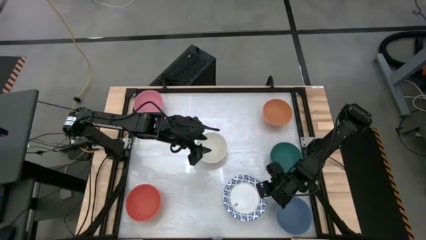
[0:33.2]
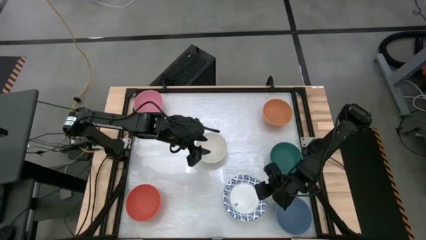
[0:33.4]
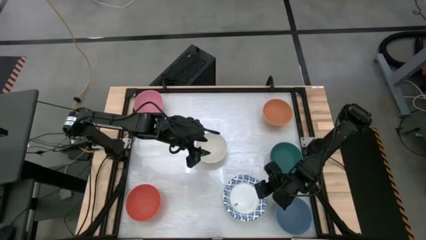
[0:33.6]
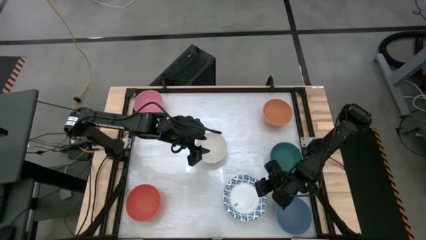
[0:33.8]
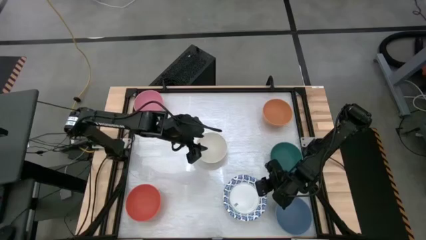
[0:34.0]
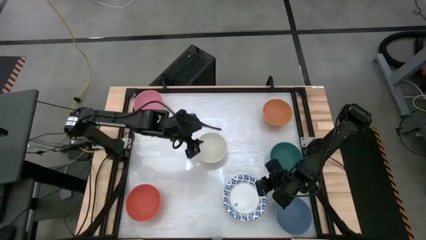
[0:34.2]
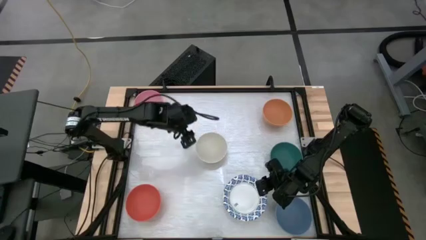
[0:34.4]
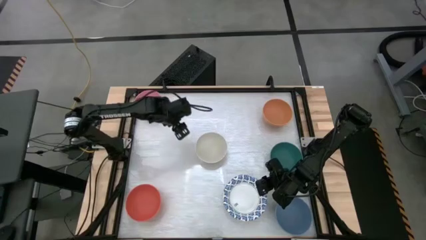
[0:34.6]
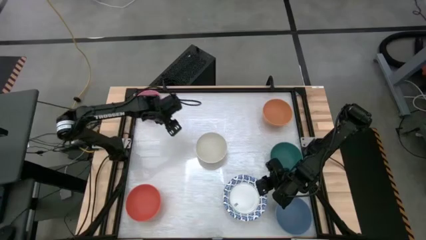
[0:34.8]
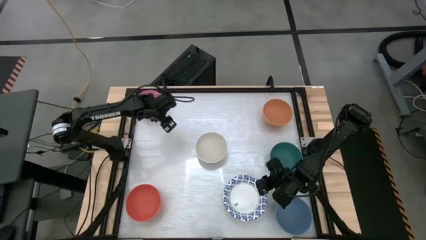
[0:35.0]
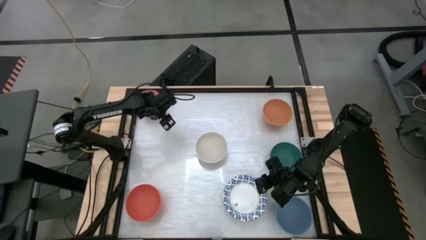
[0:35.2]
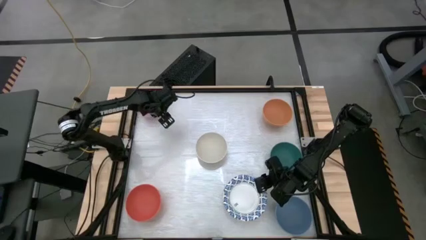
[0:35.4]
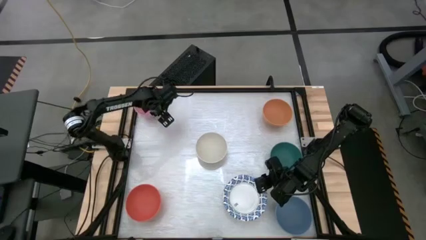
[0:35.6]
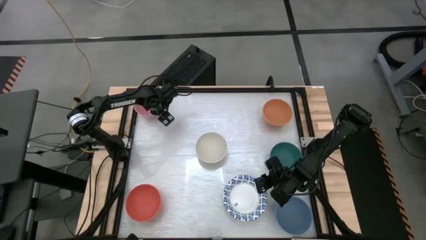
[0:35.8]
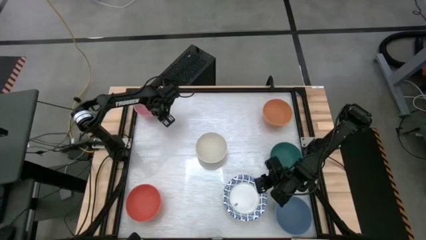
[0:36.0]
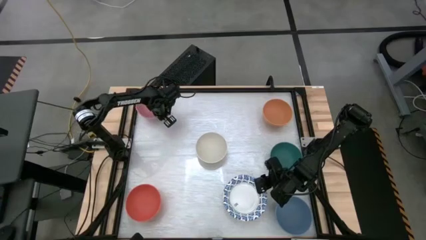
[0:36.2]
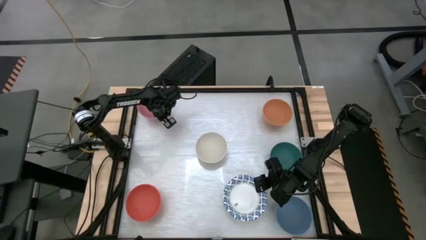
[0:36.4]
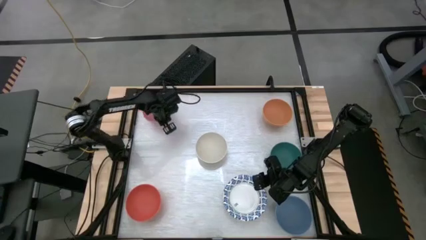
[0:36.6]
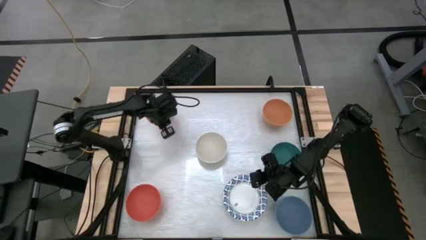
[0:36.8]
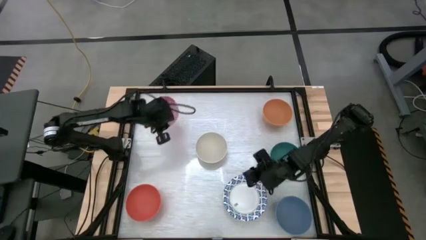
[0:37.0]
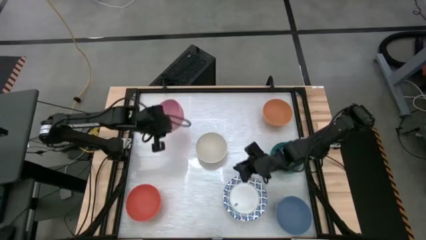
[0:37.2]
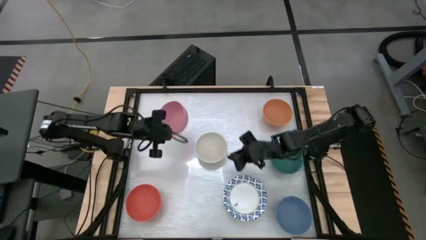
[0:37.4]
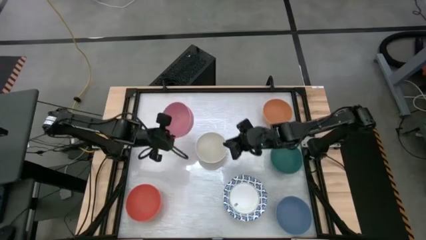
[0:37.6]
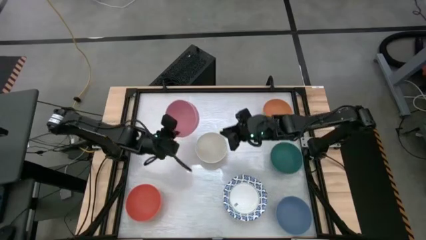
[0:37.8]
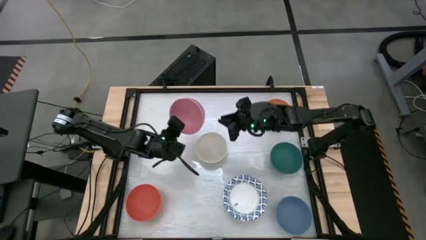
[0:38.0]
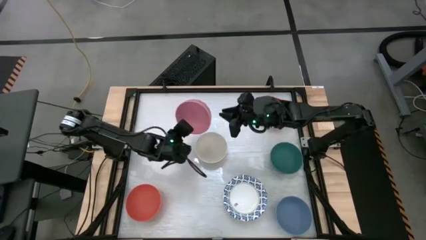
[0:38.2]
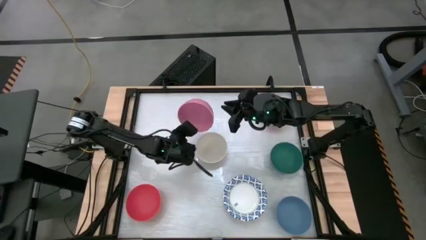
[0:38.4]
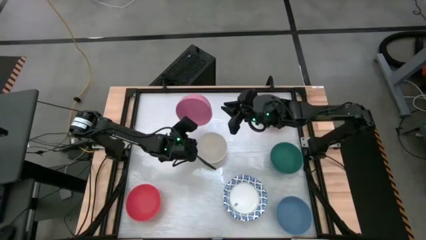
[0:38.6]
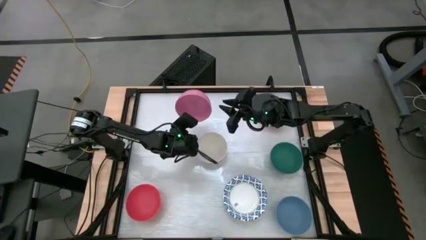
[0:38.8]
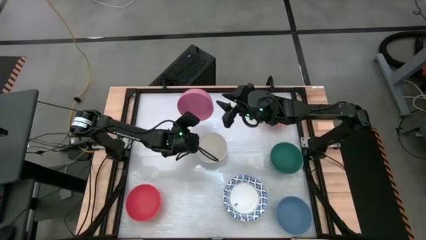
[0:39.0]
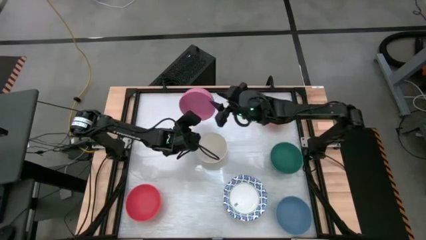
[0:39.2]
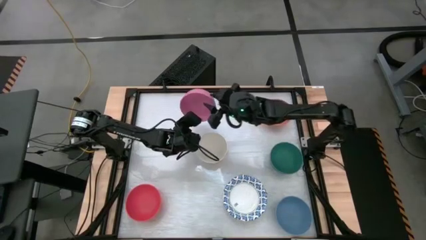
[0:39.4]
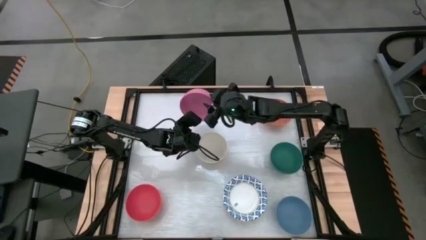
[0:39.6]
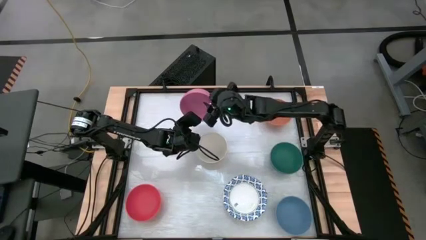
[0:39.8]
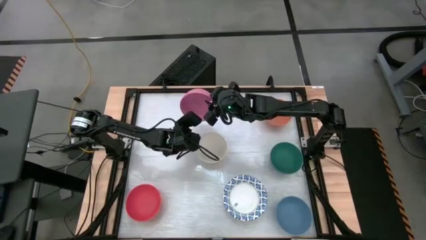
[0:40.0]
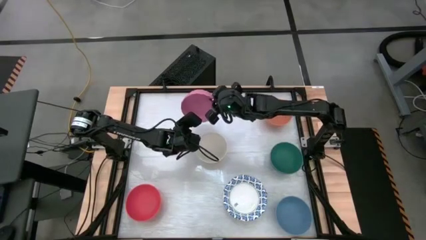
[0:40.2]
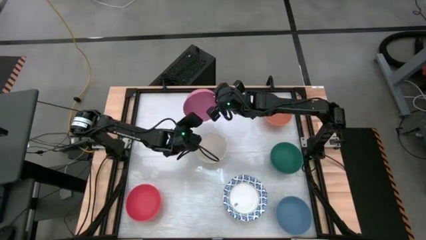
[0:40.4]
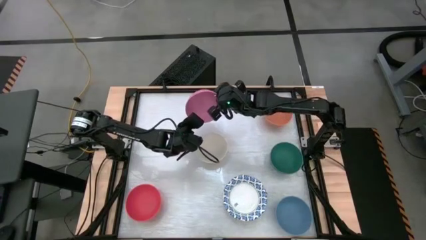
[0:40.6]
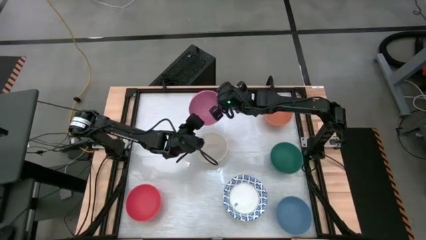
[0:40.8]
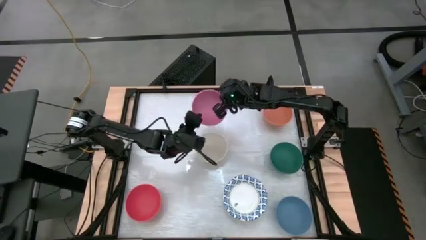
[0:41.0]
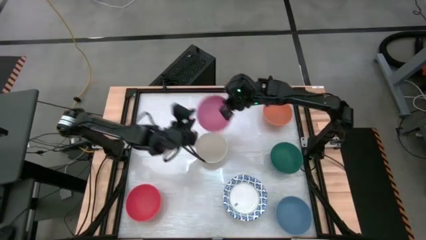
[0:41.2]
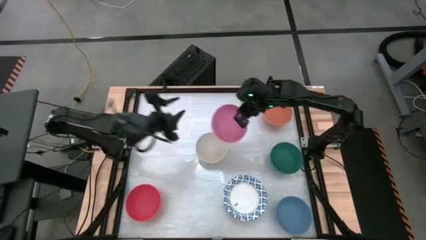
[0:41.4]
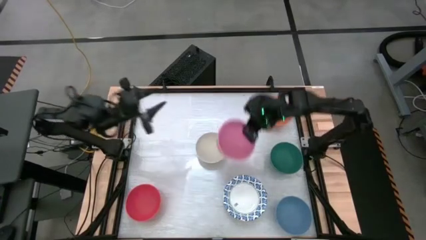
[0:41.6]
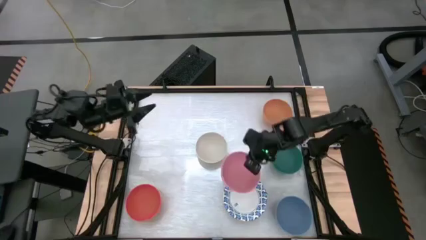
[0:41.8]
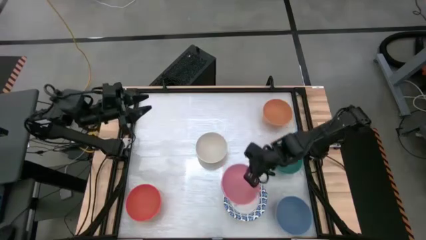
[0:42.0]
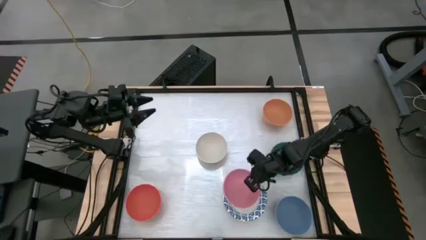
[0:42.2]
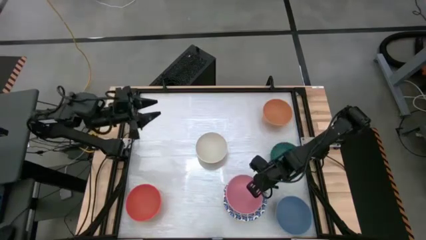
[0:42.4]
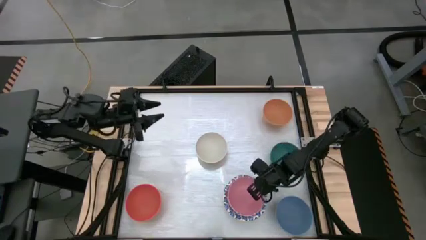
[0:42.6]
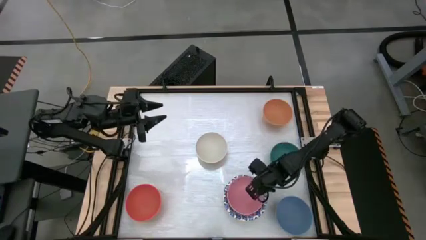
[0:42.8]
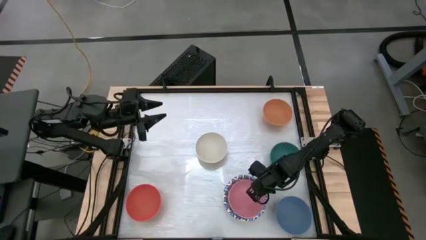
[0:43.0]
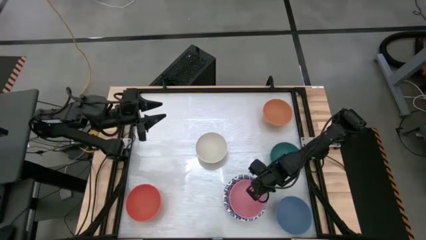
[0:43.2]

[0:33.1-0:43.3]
Stack the pink bowl on top of the white patterned bowl

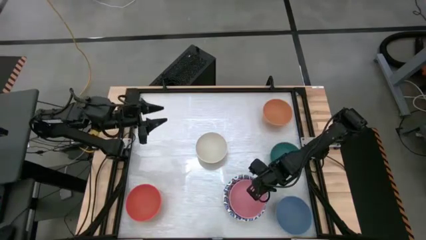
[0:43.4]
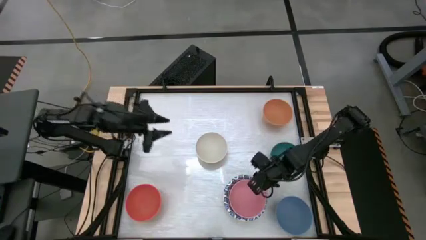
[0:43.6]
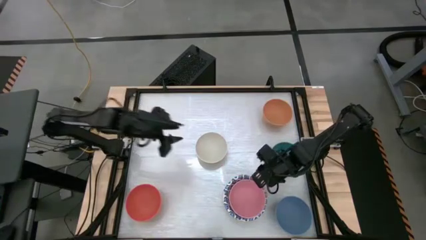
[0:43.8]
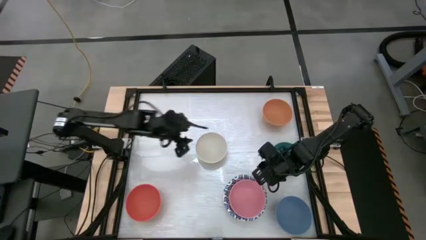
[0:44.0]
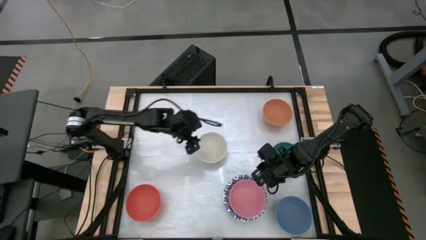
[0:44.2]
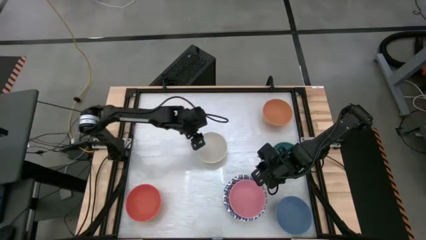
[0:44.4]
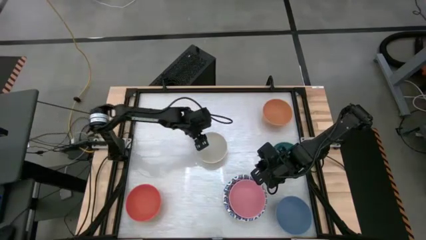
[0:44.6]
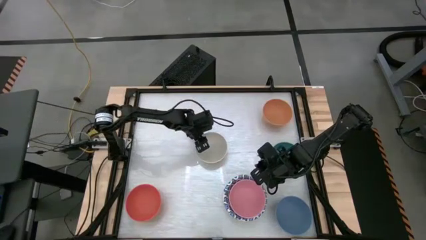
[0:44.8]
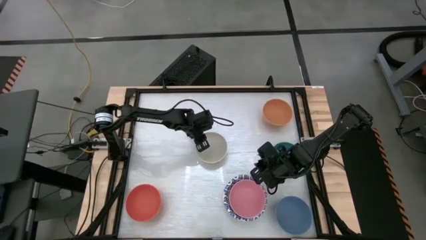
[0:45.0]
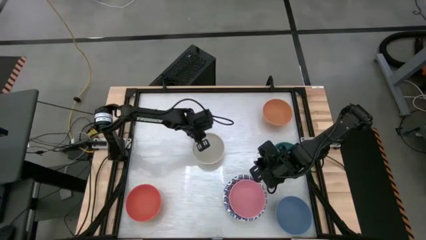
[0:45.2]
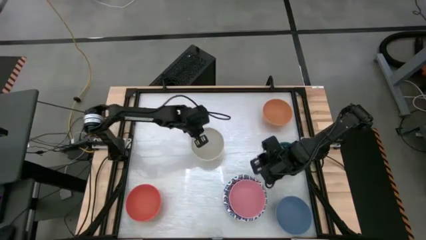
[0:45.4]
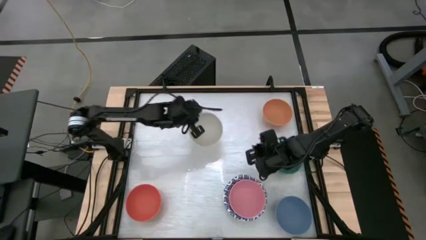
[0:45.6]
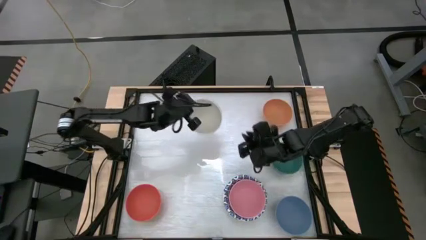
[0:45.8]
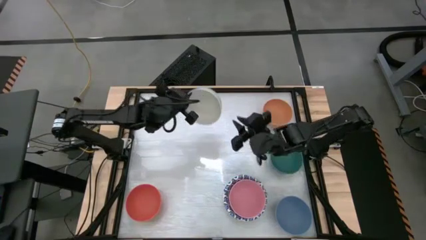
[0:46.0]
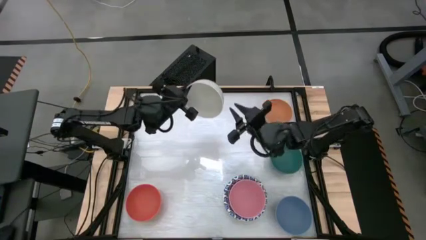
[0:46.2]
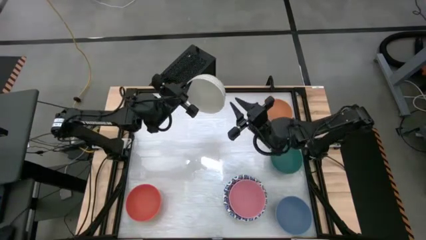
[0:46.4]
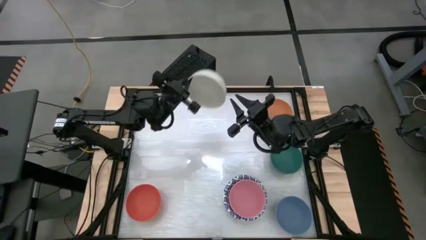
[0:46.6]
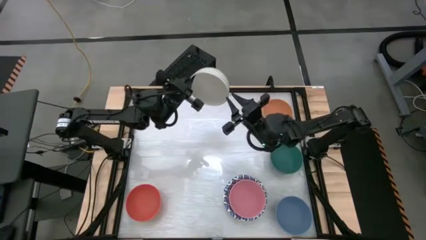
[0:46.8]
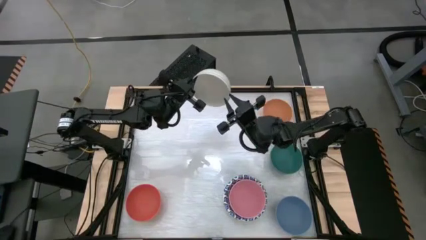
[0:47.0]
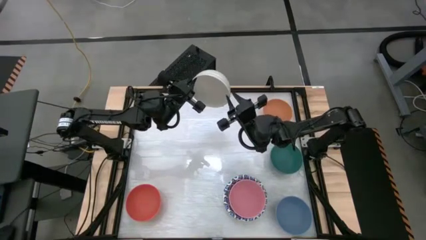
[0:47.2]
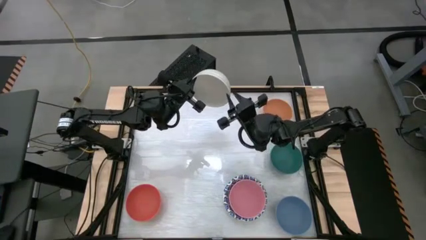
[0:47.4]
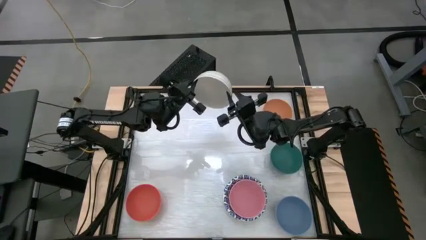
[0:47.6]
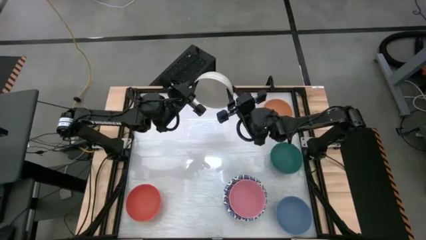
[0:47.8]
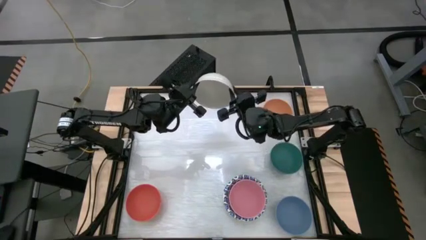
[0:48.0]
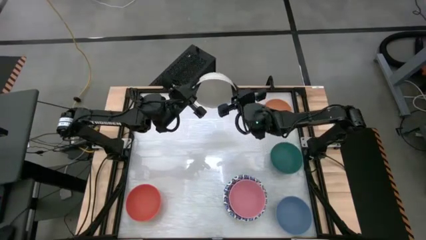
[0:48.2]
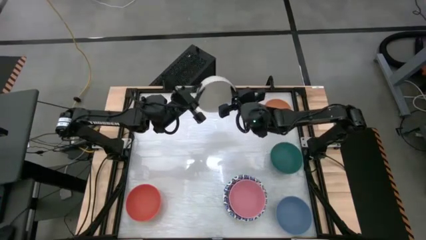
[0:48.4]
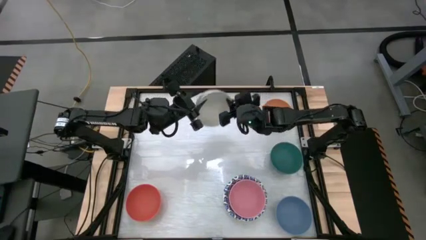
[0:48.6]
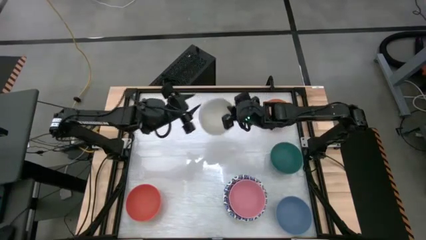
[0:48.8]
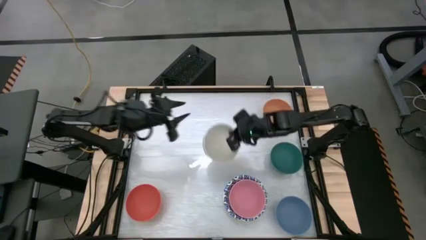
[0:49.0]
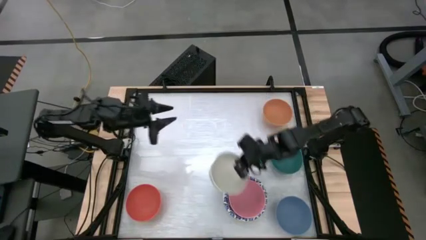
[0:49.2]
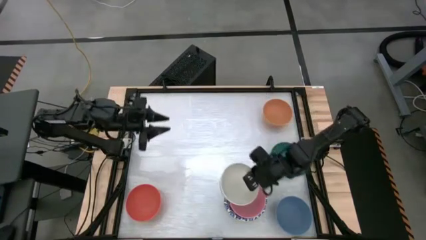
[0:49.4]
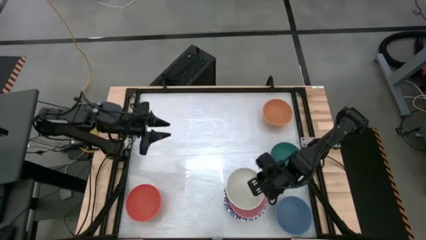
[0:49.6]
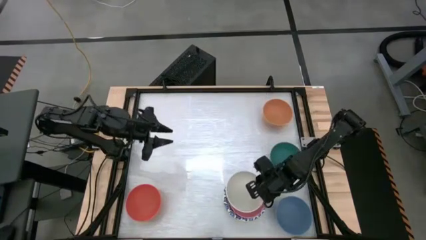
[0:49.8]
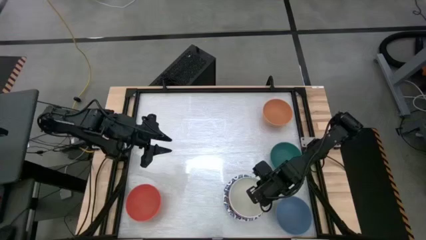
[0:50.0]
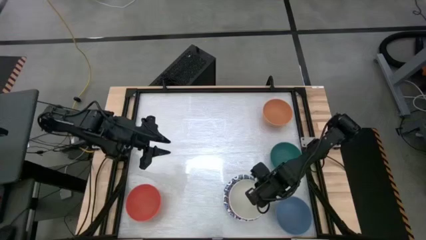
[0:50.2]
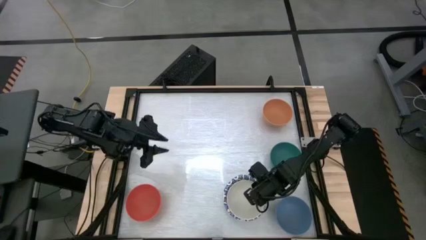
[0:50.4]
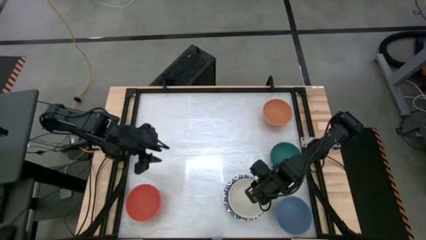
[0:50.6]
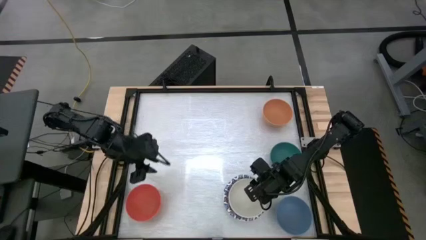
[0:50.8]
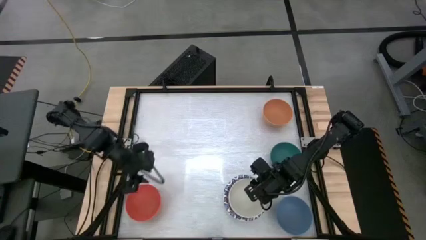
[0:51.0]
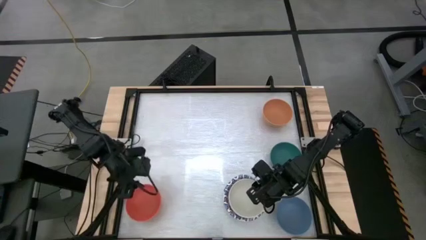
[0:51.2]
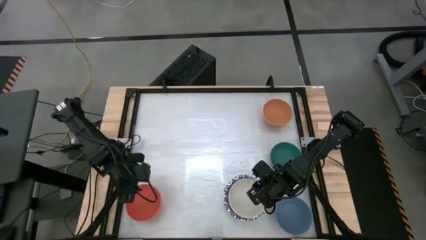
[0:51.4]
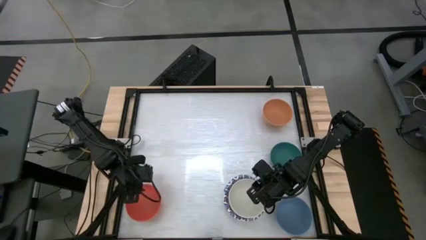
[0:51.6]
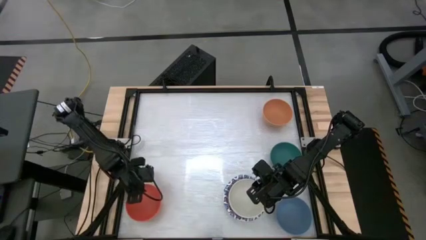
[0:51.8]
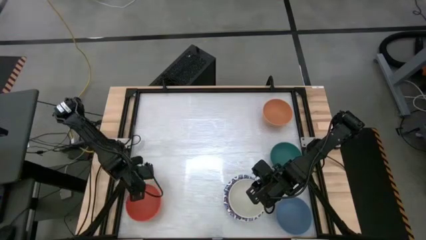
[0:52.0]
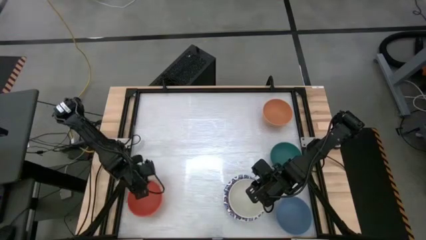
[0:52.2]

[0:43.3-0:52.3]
Stack the gray bowl on top of the pink bowl
